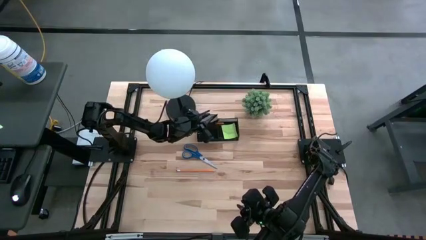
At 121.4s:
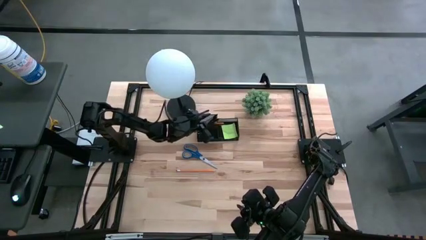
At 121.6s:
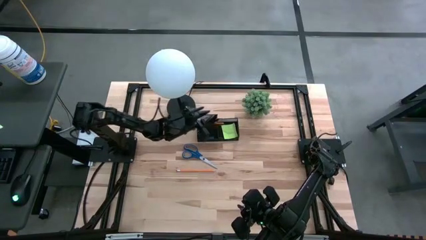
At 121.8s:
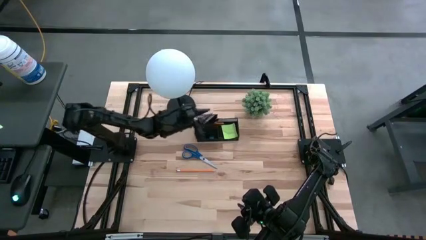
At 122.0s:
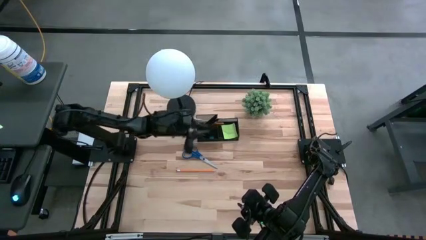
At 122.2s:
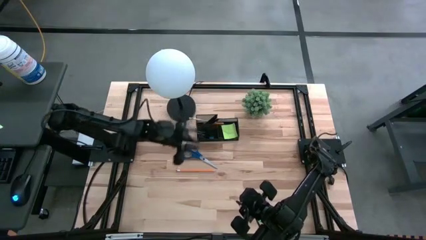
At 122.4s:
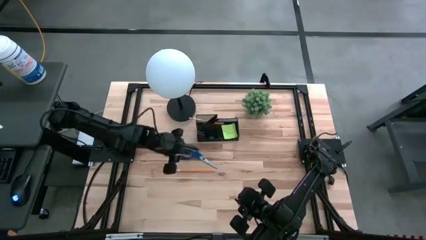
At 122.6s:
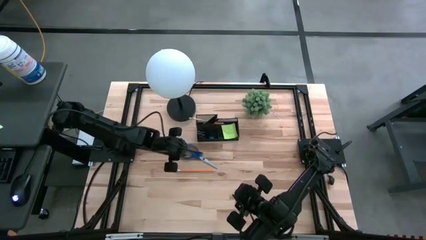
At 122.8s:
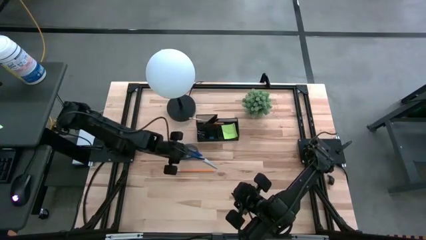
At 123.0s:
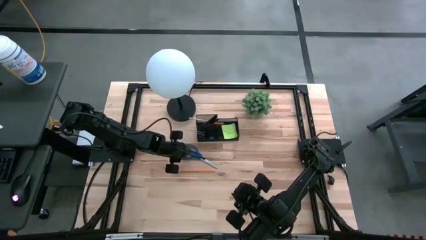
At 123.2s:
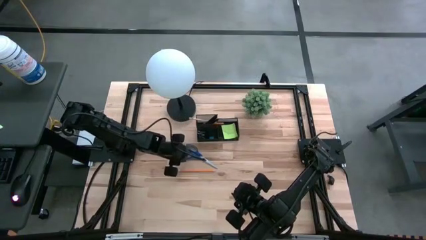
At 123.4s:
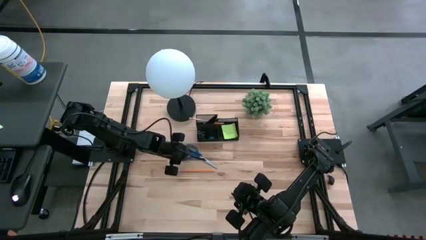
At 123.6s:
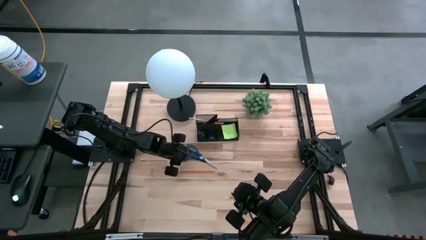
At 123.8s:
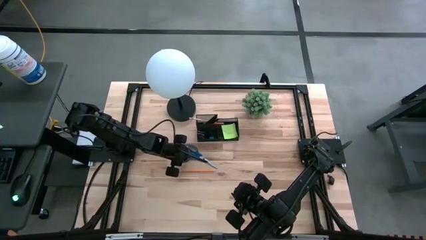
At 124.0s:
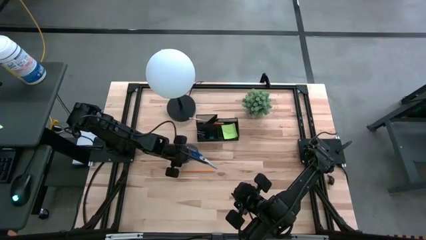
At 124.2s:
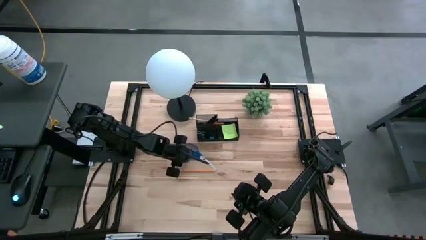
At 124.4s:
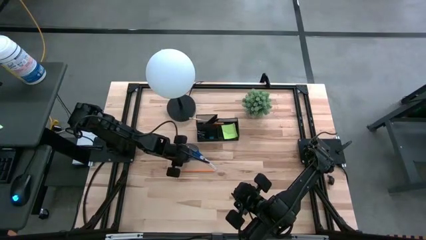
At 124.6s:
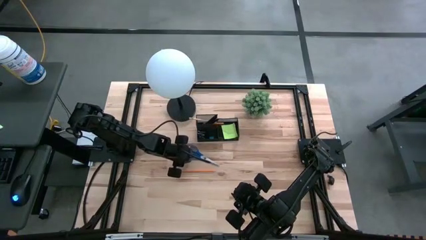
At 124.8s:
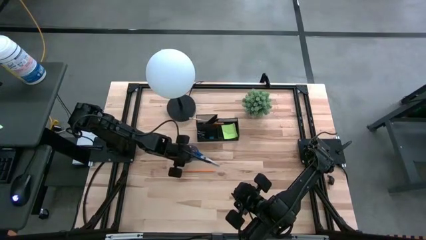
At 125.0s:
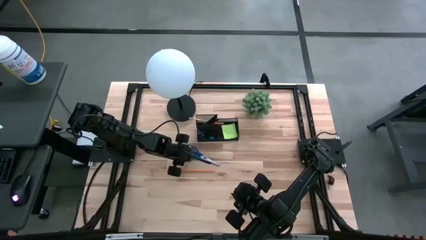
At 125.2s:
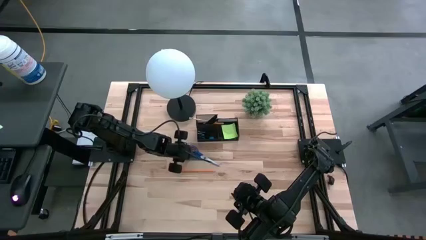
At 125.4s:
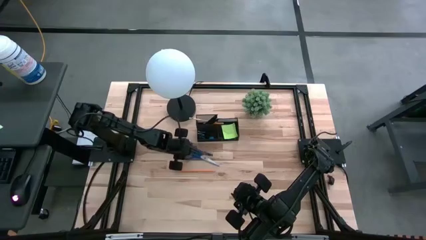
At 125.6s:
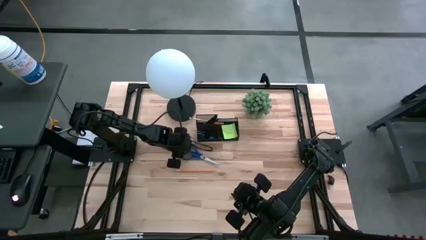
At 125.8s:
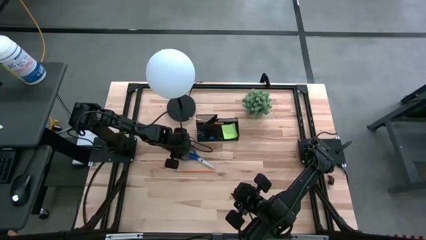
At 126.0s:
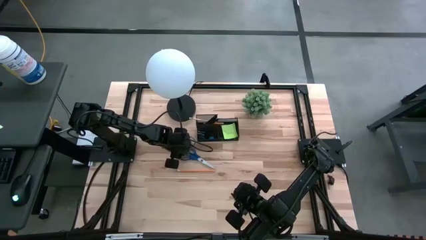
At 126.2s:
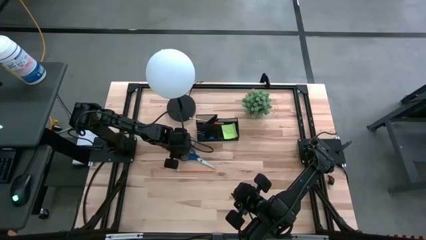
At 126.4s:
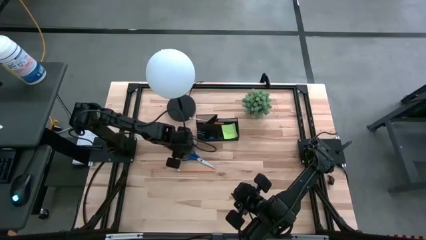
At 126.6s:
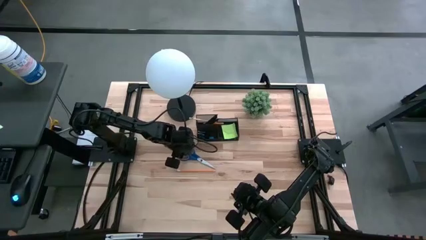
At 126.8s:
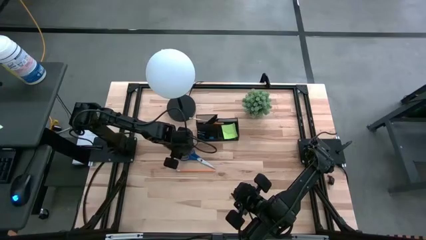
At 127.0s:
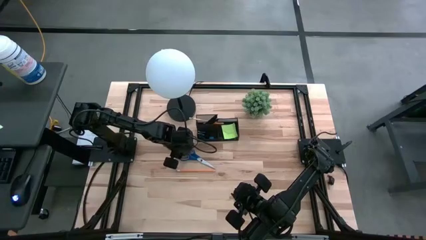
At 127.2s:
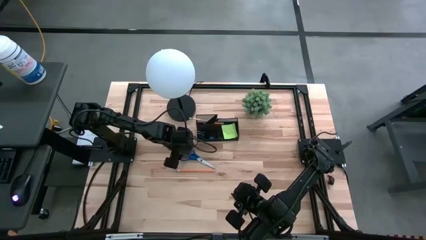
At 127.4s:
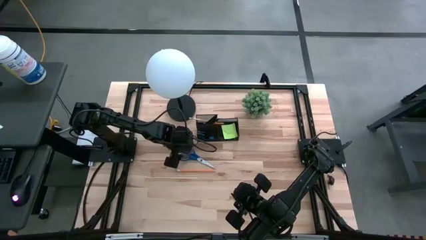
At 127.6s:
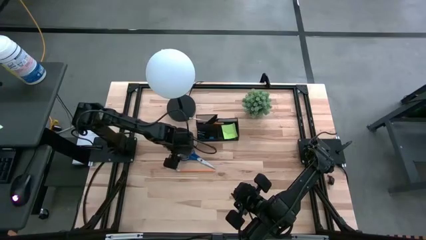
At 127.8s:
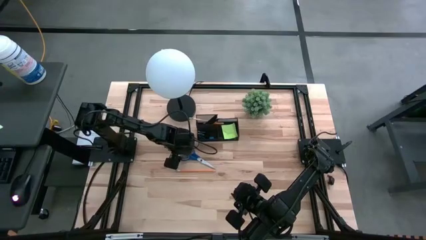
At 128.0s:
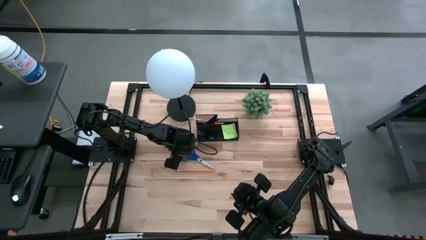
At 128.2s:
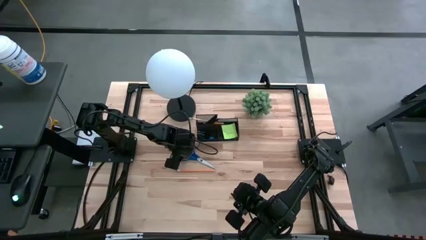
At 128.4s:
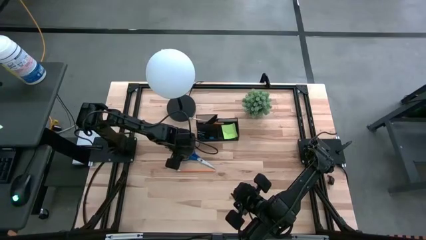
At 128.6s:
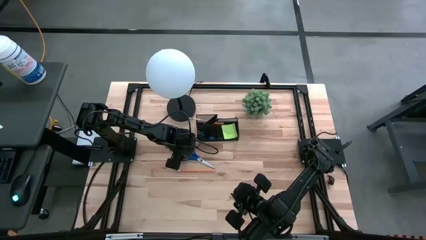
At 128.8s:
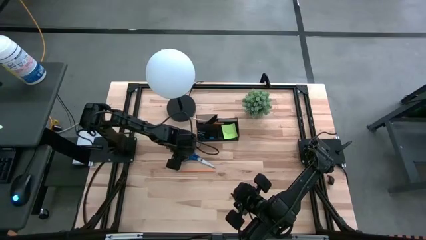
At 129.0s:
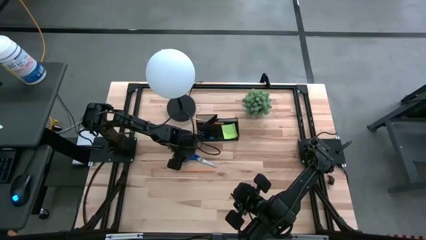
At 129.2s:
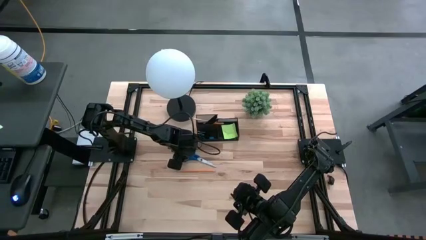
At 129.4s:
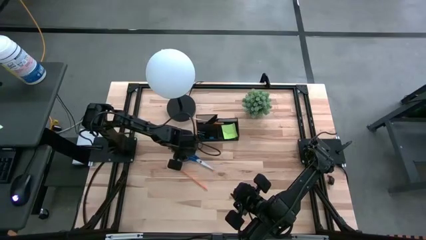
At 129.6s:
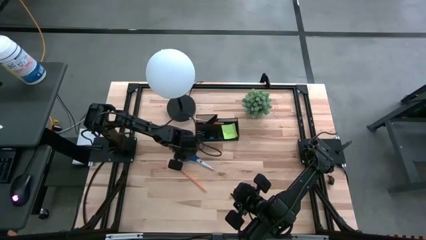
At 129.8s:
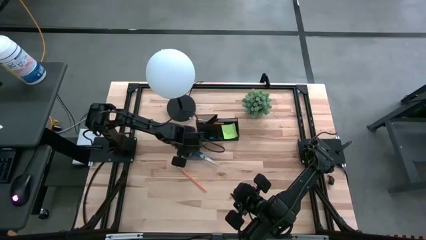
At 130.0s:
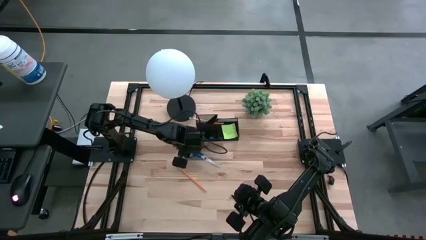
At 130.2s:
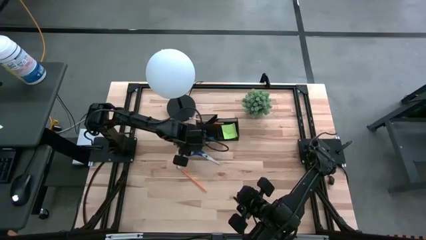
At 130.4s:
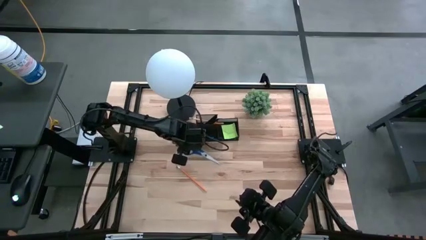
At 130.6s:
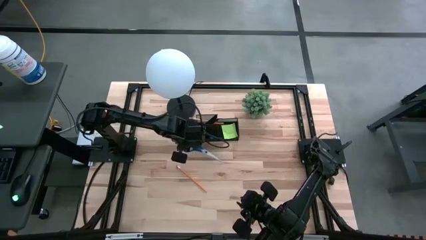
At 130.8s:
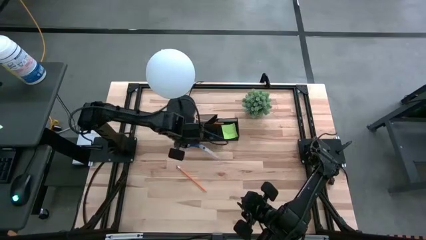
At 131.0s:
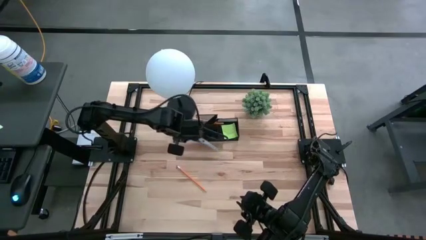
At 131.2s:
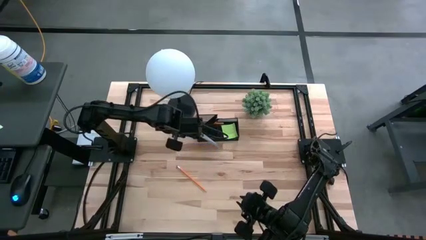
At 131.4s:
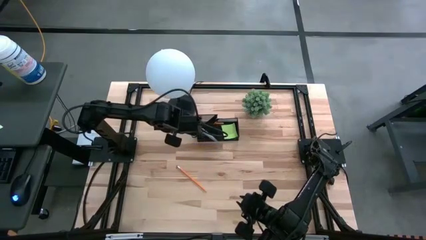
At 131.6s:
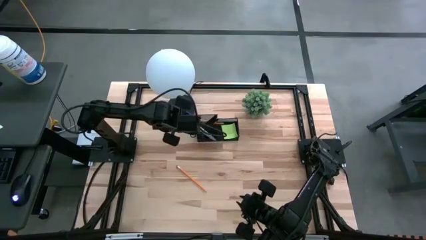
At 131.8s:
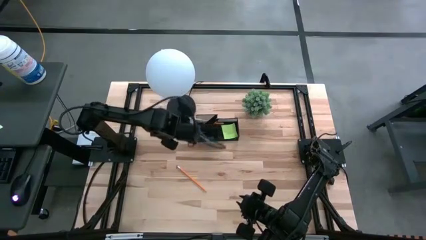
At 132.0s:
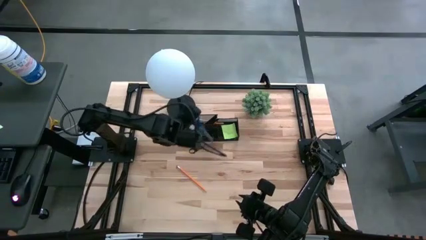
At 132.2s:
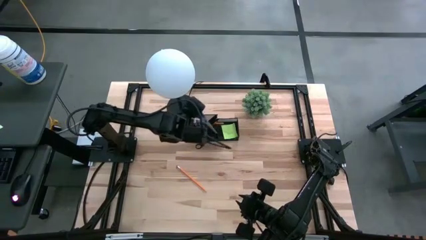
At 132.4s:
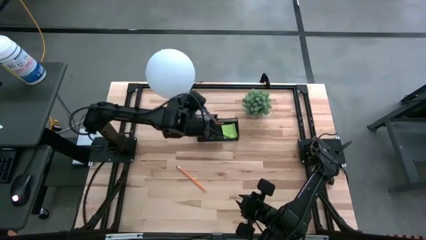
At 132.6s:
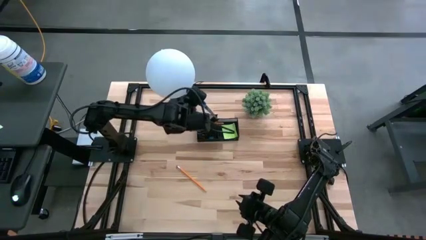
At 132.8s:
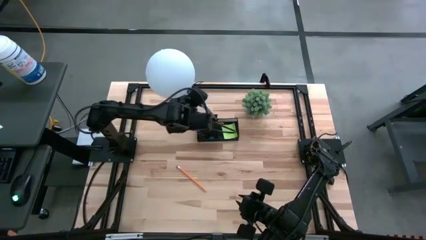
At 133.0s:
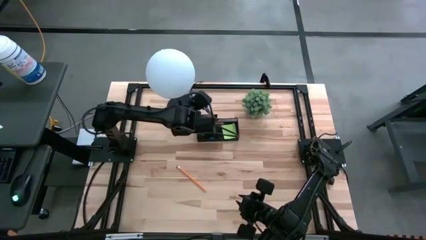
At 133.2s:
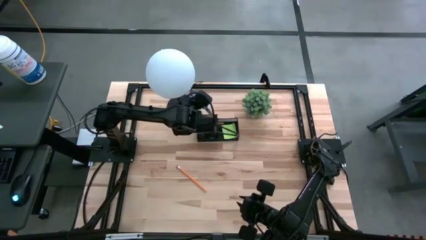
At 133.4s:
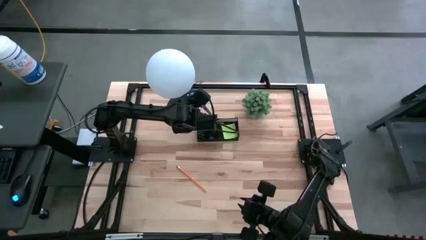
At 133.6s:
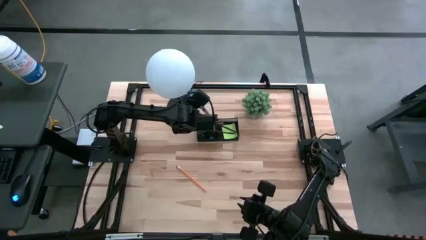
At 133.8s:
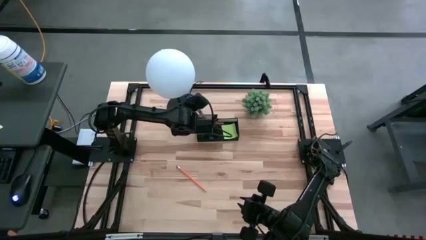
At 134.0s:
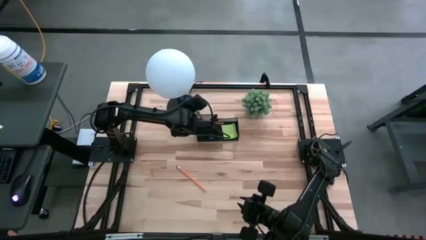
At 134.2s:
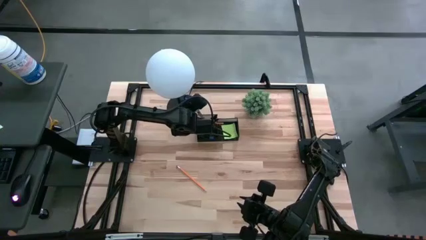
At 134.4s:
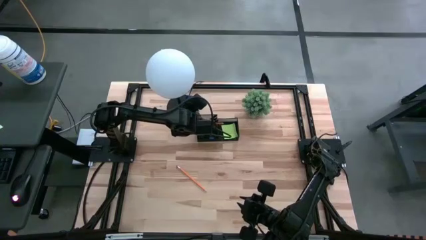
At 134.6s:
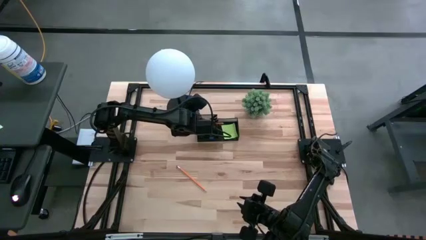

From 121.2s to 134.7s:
Task: Pick and place office supplies into organizer
Put the blue scissors into the desk organizer
